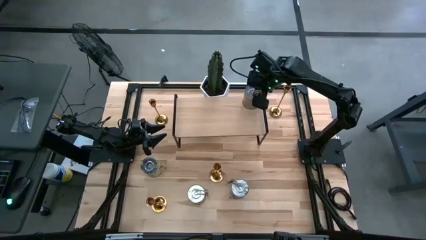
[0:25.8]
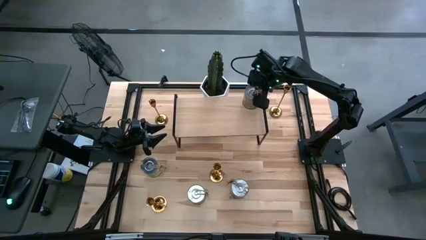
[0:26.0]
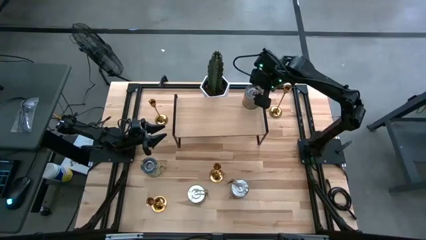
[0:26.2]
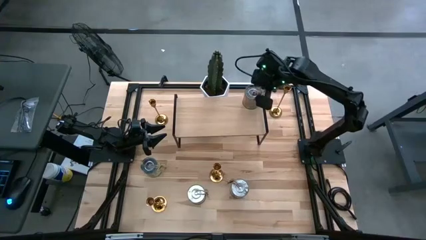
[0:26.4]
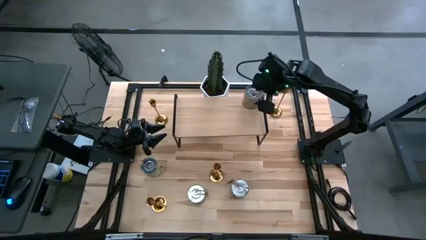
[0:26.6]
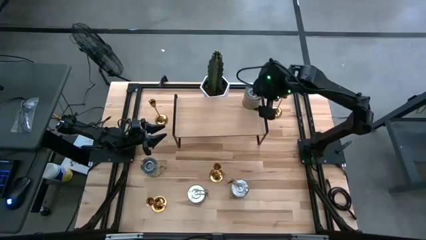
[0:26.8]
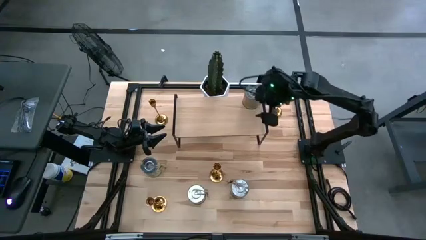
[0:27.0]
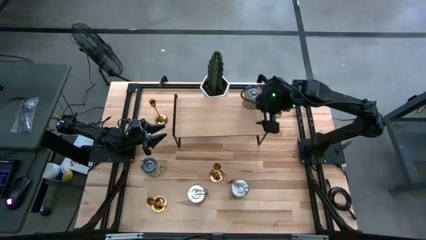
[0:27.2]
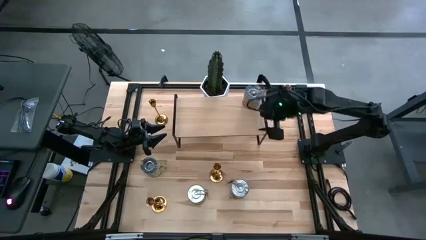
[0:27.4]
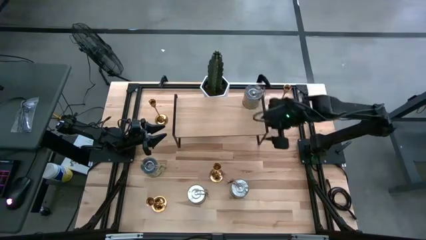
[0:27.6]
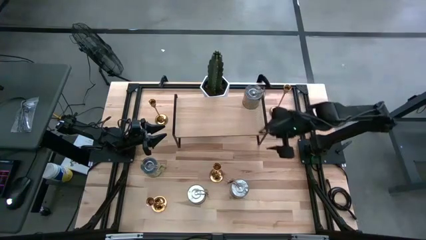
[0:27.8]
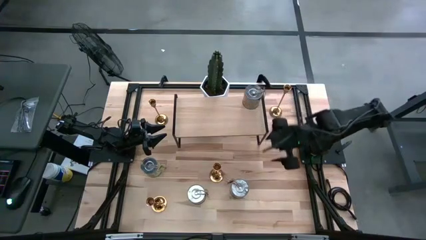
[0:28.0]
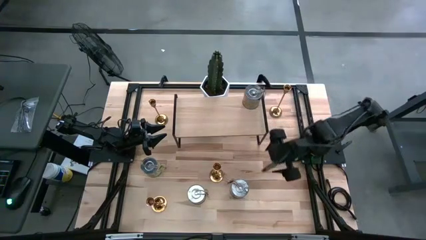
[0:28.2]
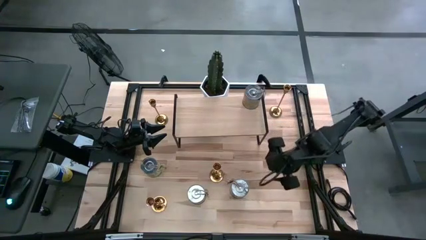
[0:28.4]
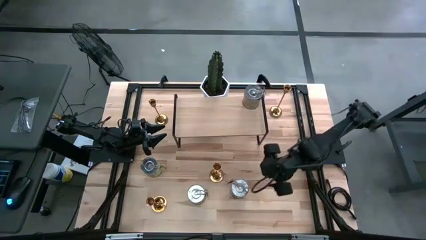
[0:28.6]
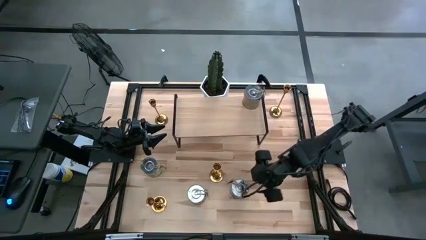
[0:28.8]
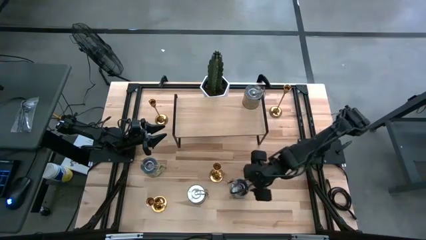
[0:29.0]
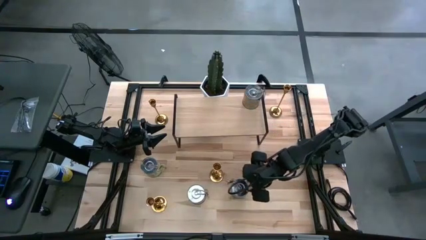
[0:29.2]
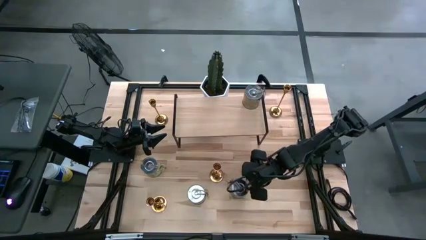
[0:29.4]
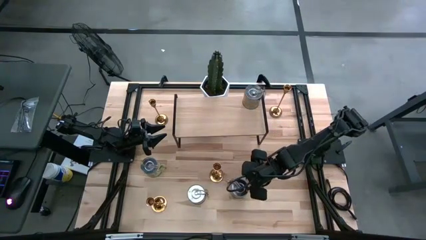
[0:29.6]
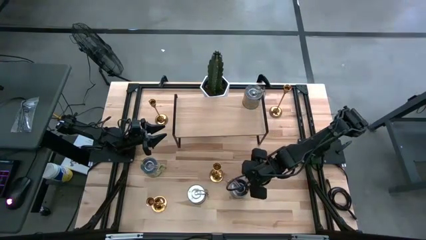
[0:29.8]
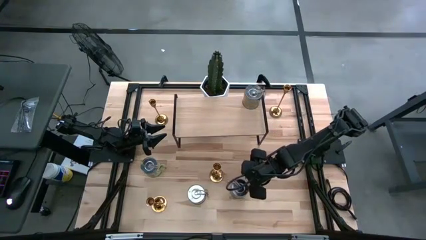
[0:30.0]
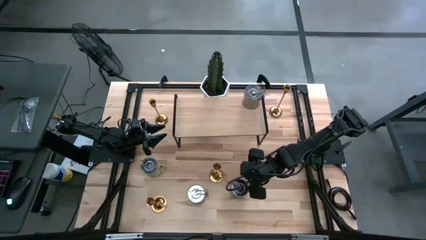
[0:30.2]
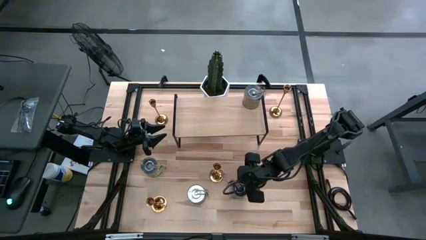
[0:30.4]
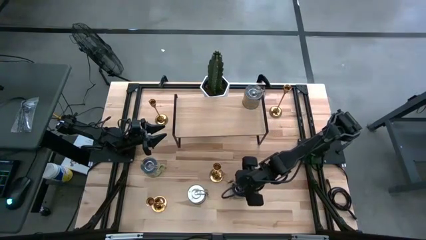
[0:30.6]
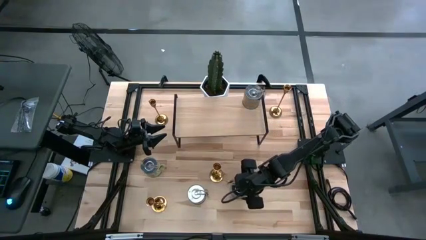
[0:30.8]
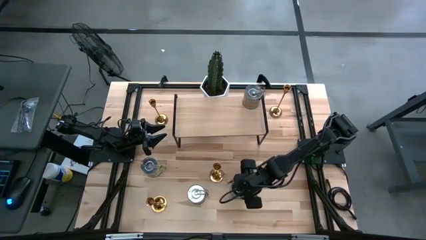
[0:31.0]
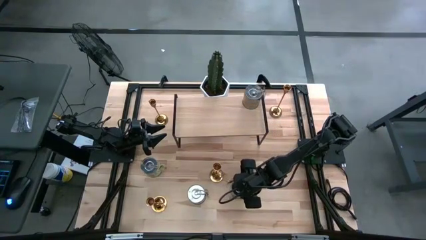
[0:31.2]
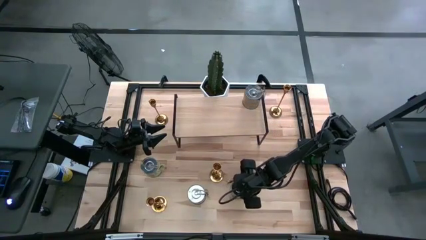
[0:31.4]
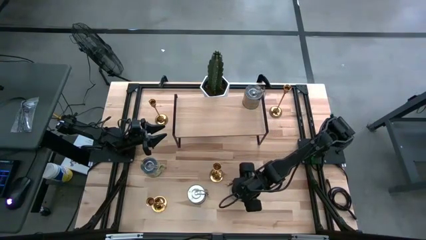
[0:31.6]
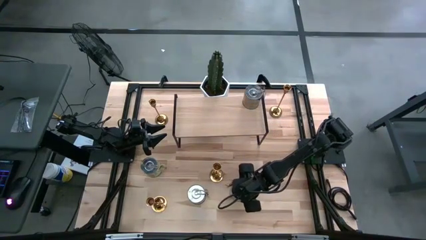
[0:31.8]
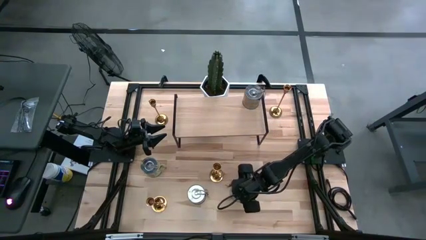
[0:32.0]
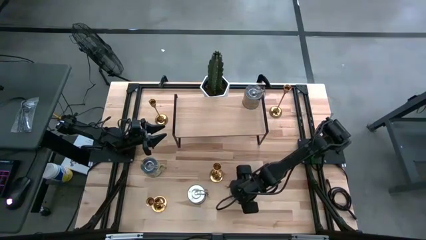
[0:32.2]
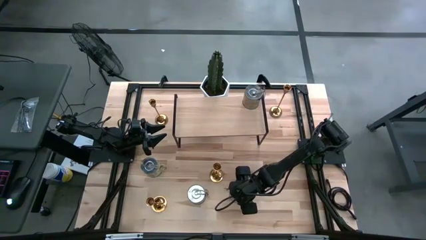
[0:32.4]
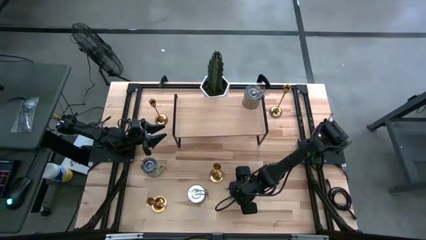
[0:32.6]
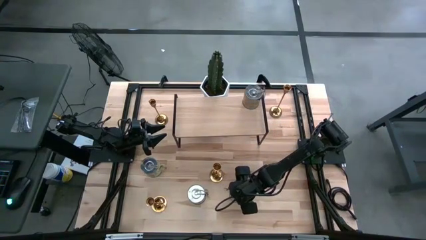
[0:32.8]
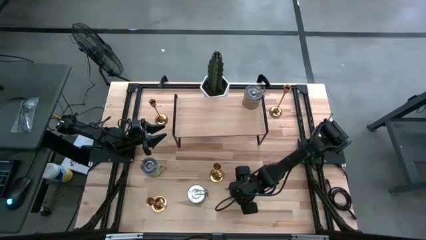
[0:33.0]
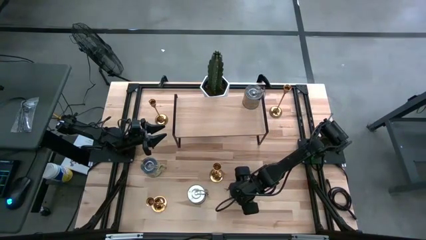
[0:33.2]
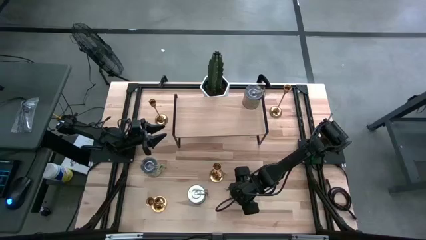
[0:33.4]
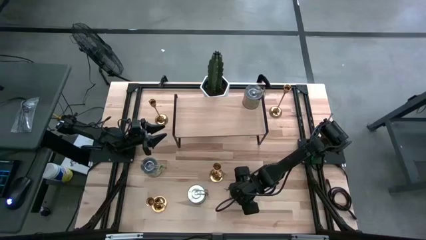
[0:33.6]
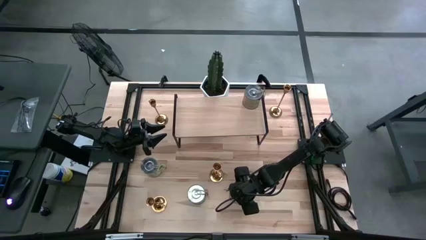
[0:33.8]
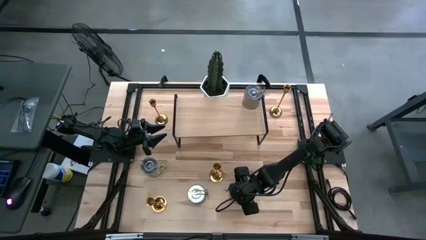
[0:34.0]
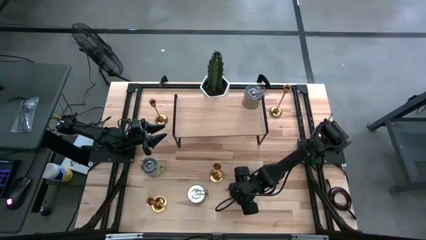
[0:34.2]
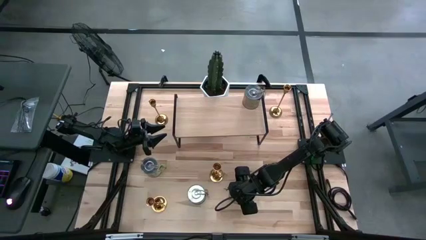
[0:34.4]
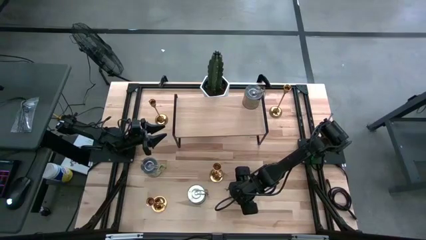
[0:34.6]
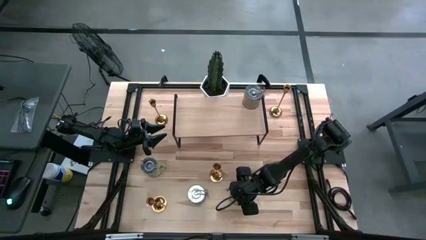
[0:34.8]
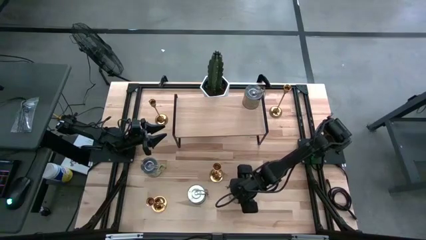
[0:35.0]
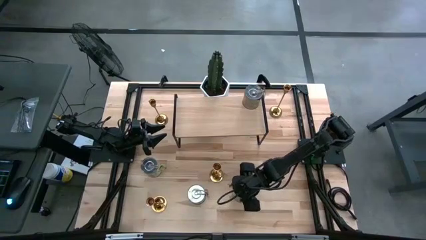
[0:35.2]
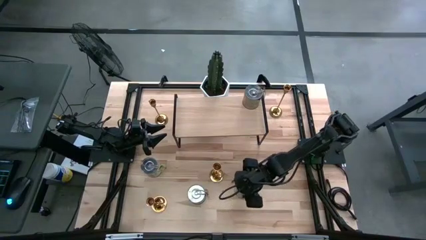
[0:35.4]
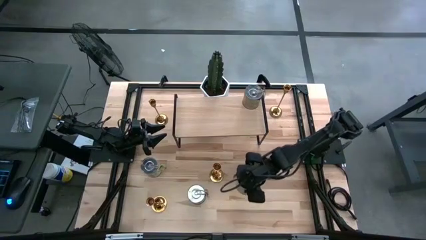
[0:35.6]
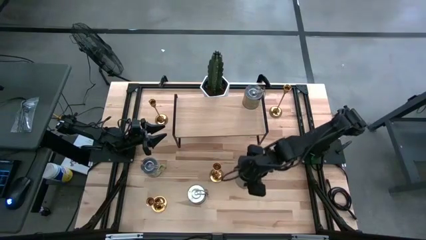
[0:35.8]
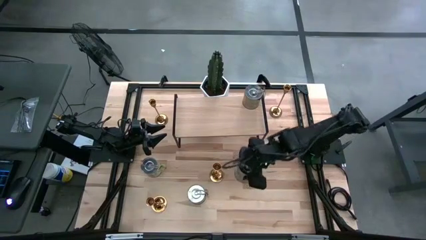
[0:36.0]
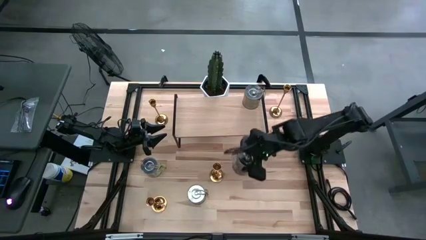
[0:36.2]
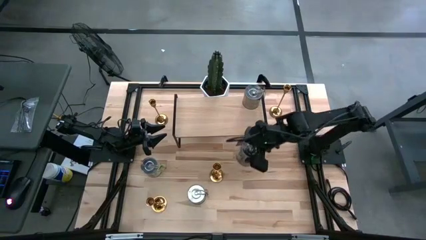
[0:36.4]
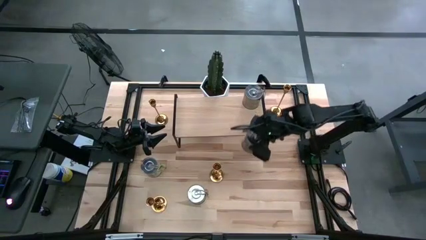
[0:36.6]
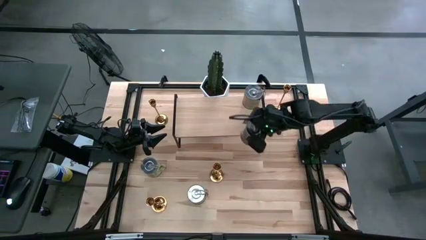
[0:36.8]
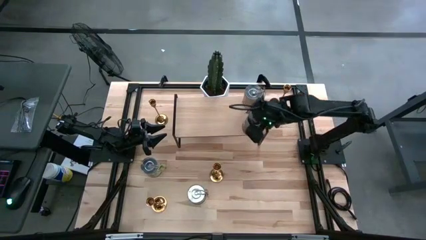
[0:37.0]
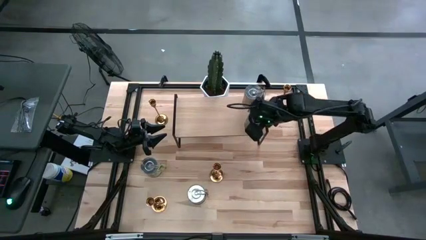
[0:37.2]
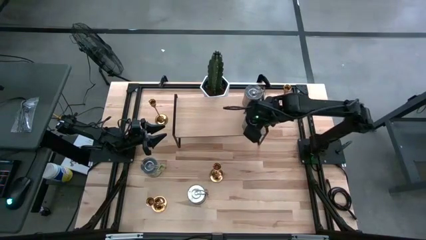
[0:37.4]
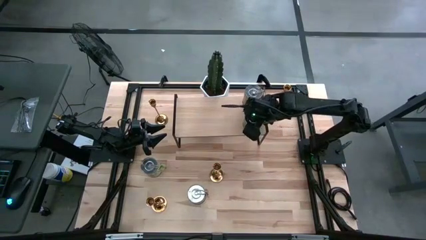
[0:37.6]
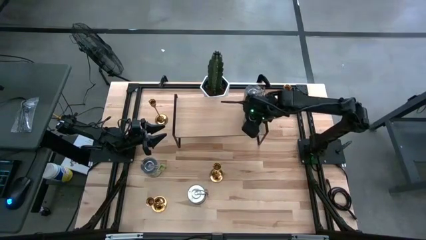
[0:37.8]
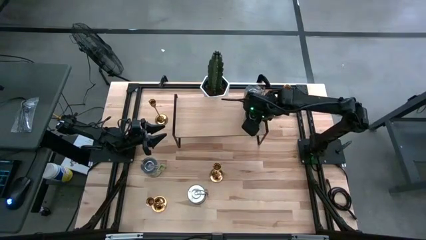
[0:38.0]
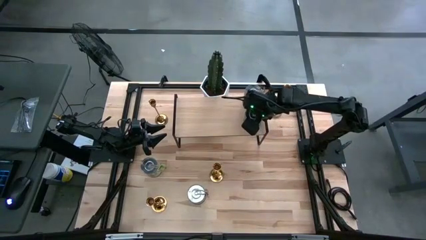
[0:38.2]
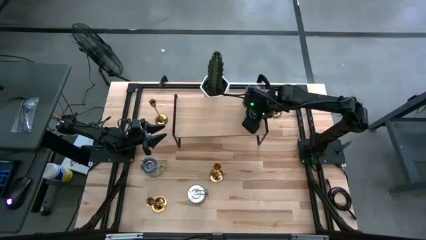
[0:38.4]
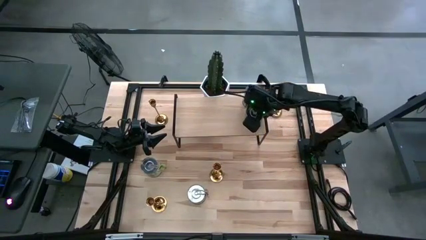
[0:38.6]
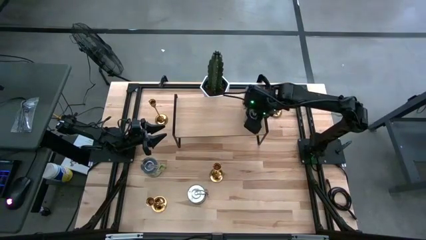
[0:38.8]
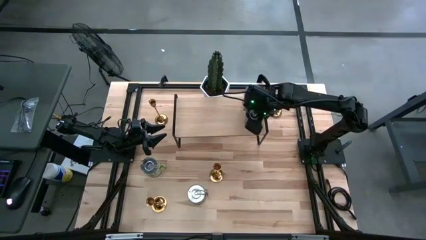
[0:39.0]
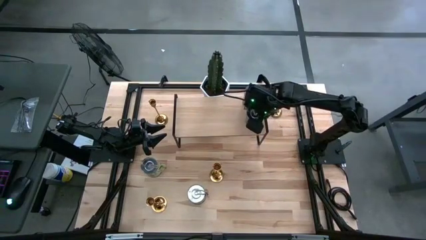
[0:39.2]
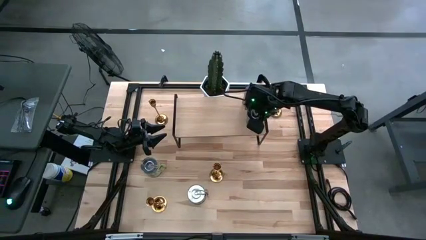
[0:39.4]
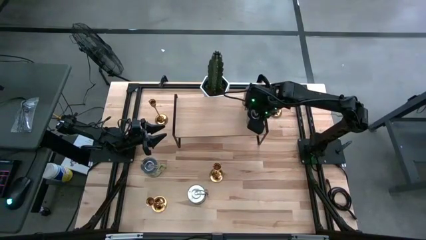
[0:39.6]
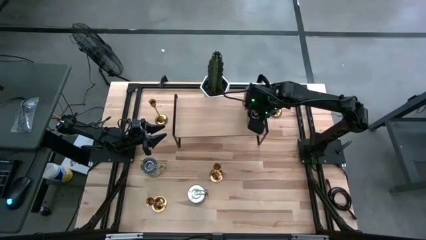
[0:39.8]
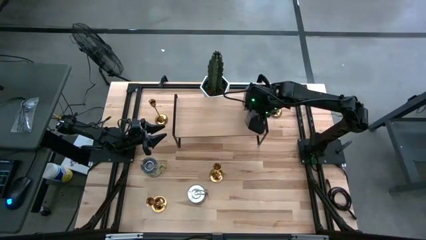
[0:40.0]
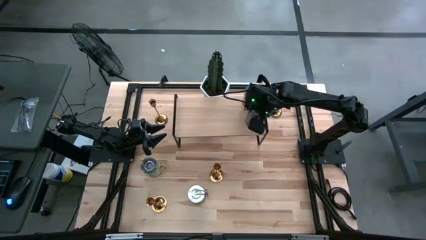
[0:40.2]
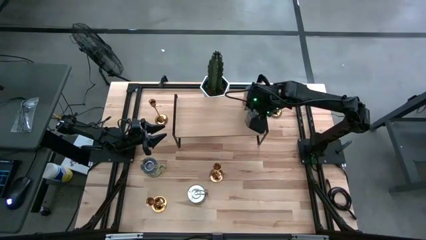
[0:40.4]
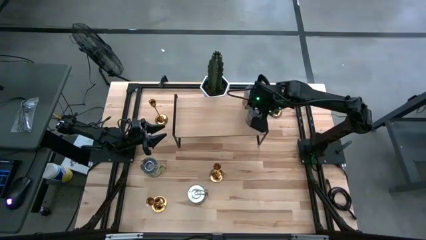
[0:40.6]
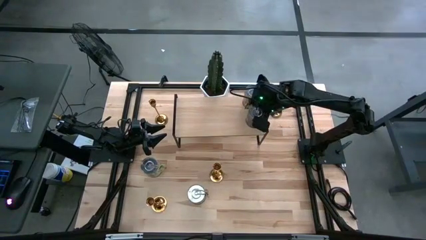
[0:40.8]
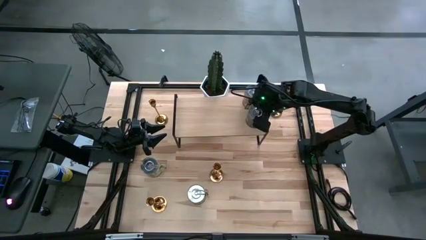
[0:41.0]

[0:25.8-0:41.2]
Task: Pick & Place candle stick holders
Put the silver scented candle can on the shelf
